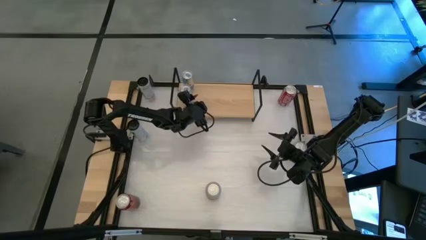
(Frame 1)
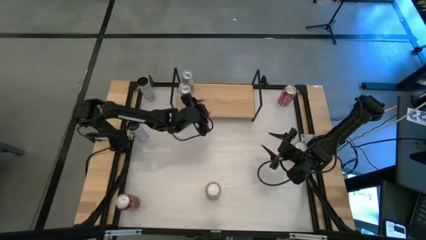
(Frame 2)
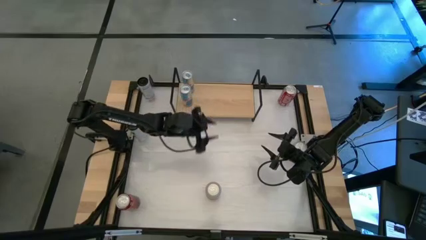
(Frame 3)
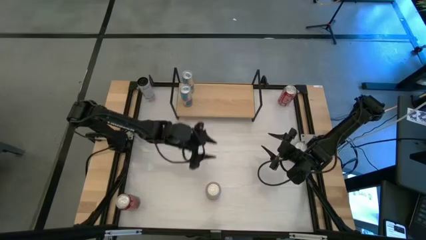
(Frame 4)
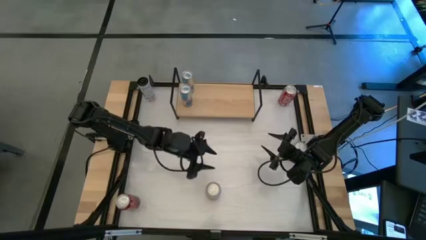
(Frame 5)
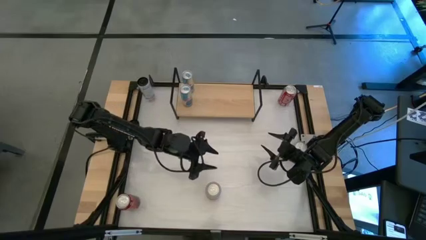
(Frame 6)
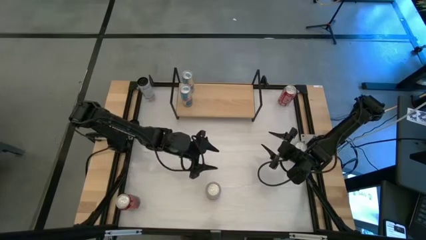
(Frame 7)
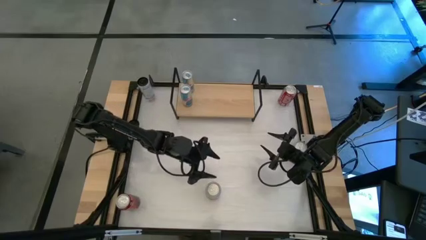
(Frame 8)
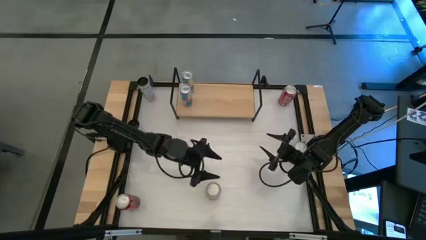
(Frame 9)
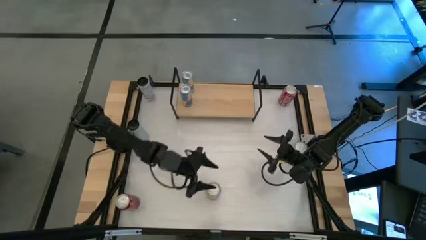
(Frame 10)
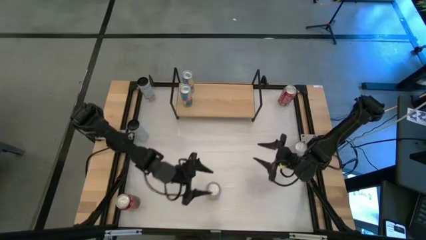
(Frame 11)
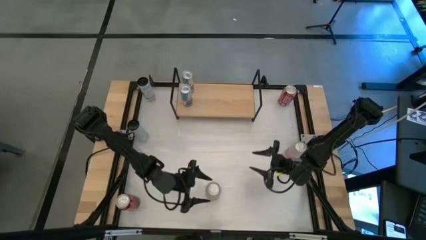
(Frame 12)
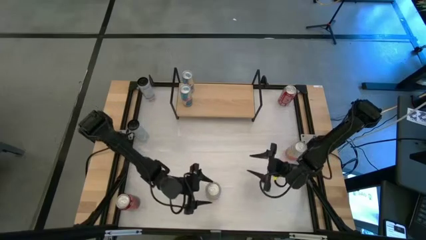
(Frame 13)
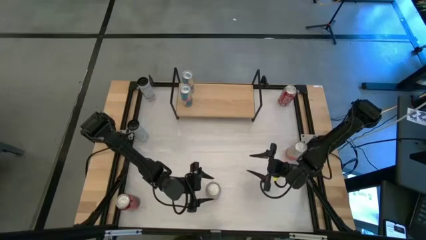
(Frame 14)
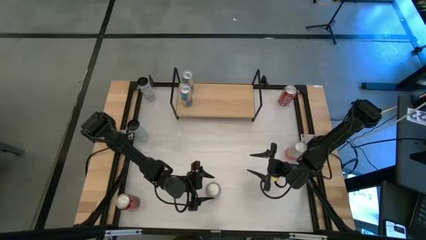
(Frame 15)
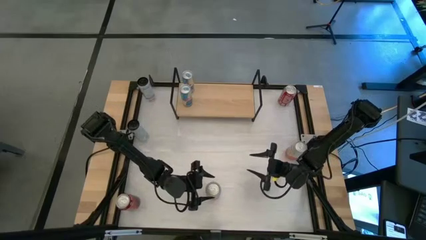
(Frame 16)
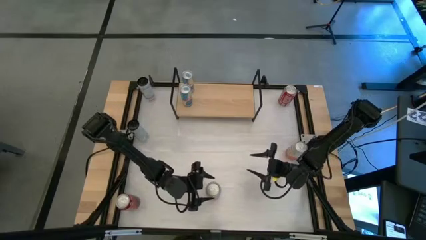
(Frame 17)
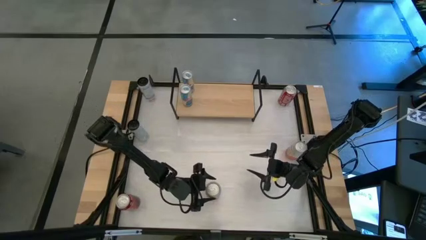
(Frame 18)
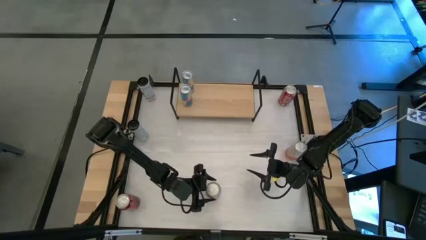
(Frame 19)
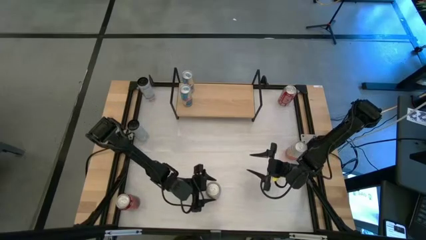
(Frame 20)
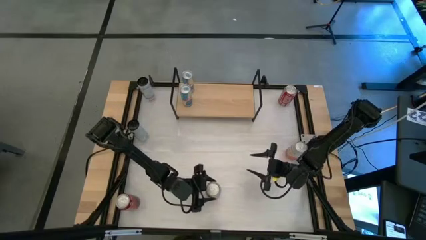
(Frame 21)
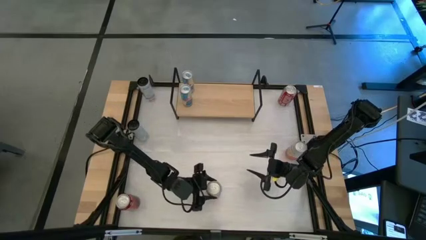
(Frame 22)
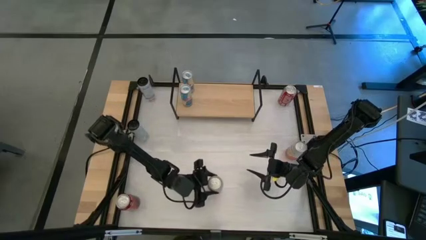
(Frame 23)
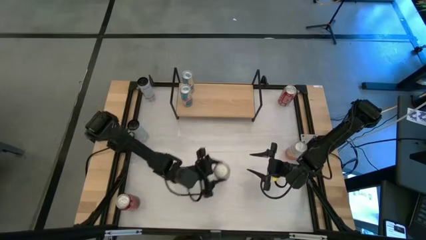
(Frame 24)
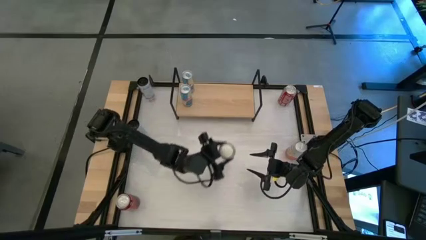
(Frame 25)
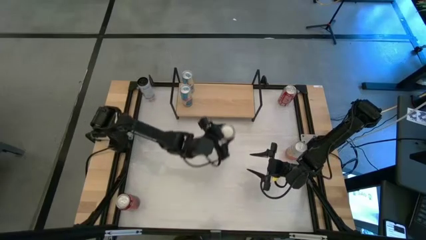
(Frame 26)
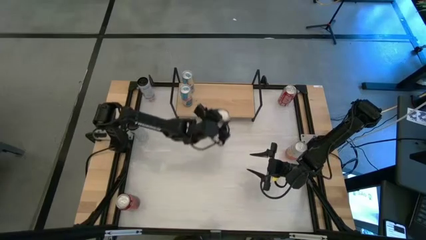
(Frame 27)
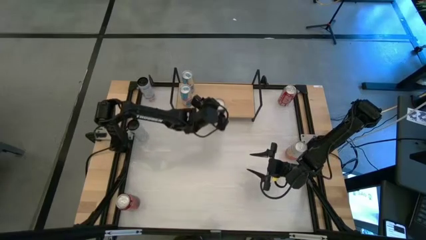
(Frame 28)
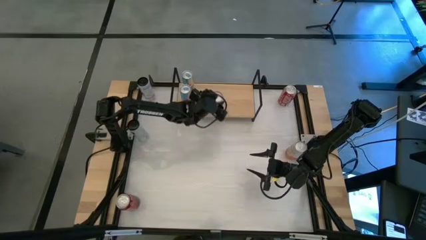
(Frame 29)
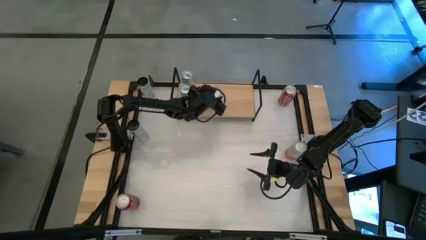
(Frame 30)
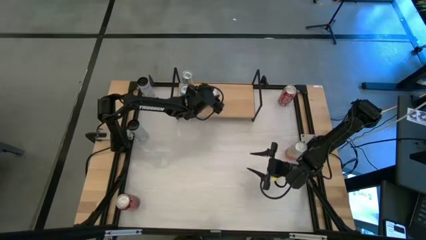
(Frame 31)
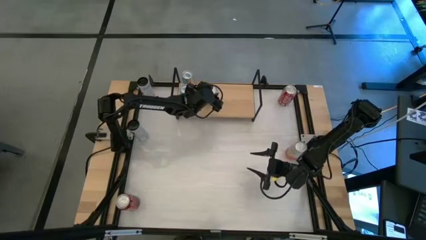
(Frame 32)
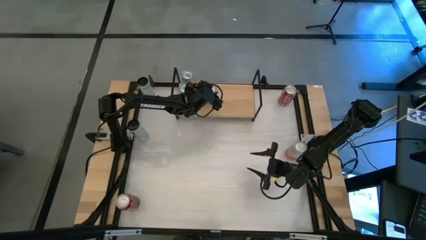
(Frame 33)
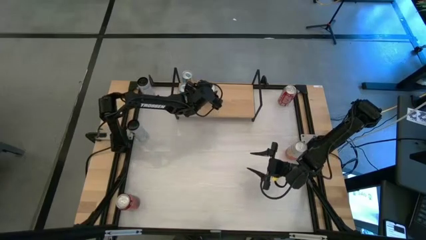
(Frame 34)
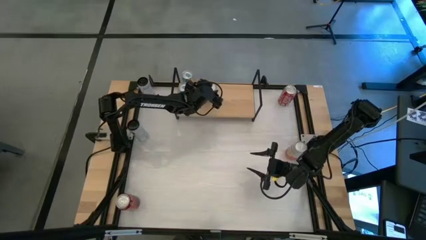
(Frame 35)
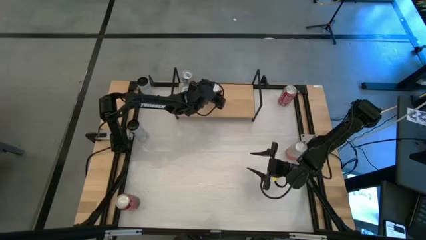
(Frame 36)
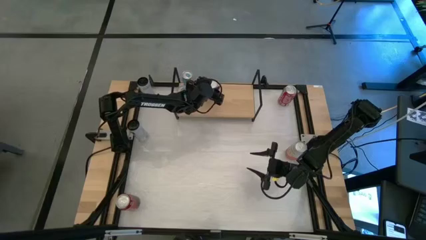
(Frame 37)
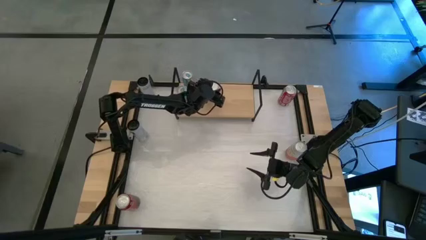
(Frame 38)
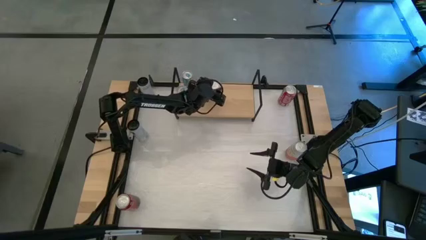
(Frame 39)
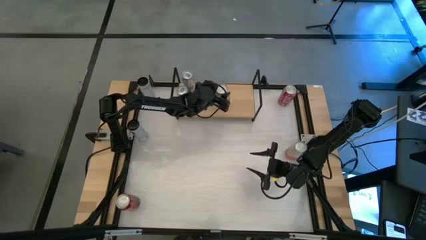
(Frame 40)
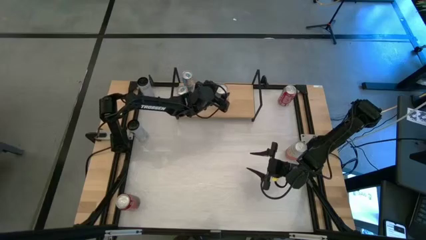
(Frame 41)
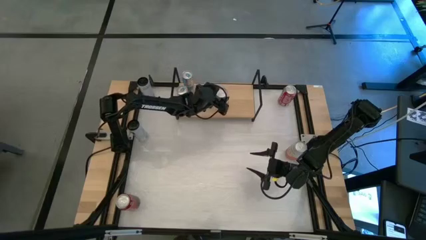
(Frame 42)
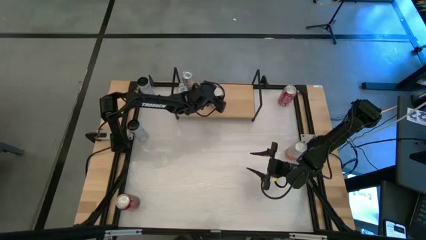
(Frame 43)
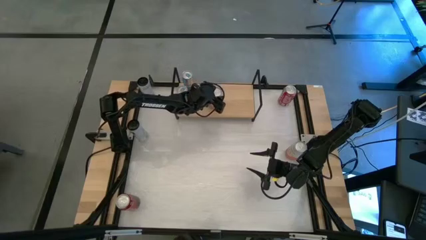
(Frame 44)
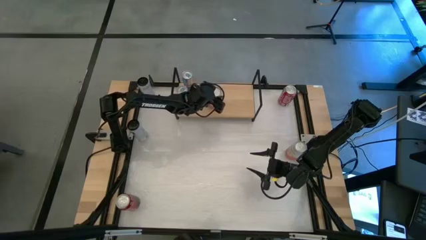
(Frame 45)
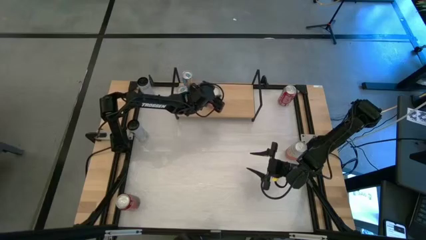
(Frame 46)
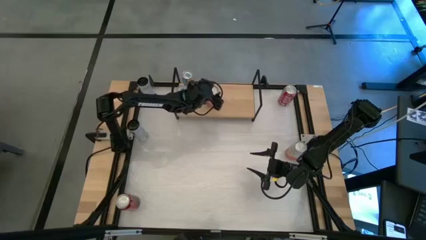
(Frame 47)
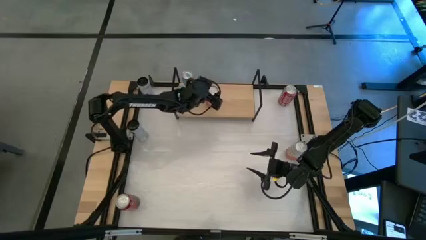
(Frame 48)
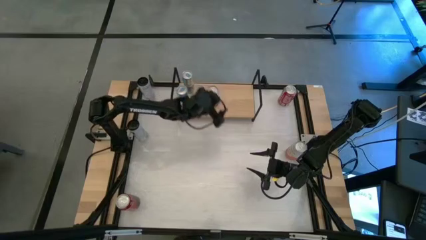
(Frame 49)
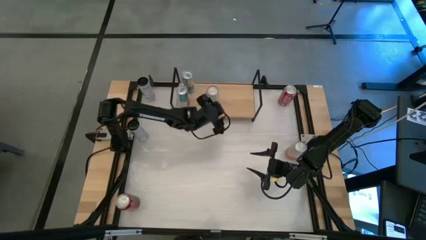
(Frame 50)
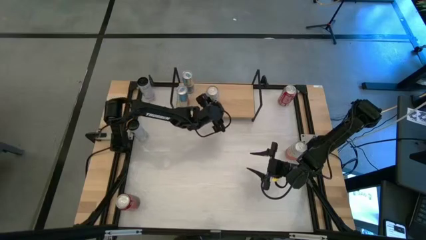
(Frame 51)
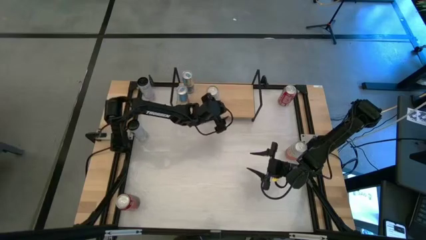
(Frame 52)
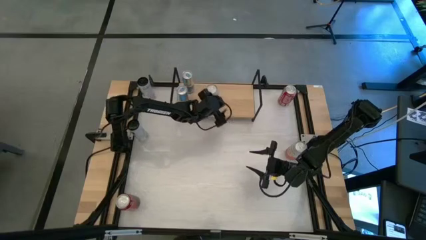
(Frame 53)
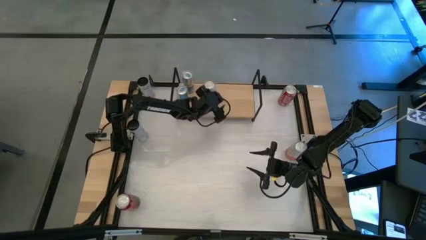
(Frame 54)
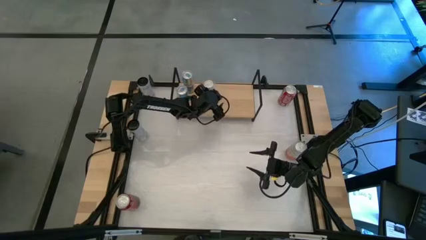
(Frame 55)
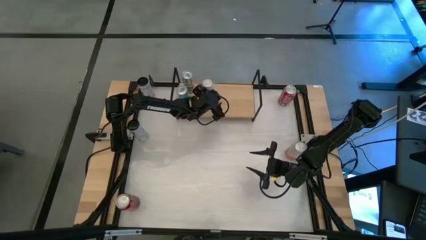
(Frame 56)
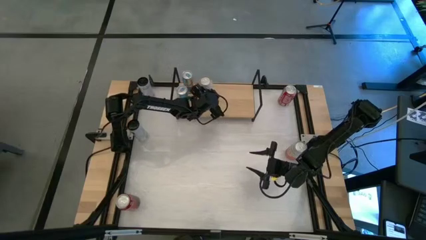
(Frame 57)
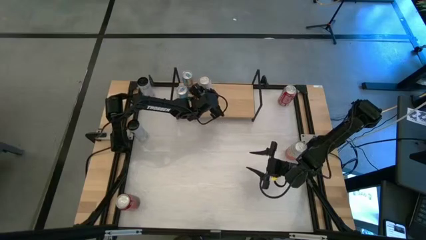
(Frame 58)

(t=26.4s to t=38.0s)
Task: Place canned beverage on shelf
Put the bottom pink and white soda can on the shelf
